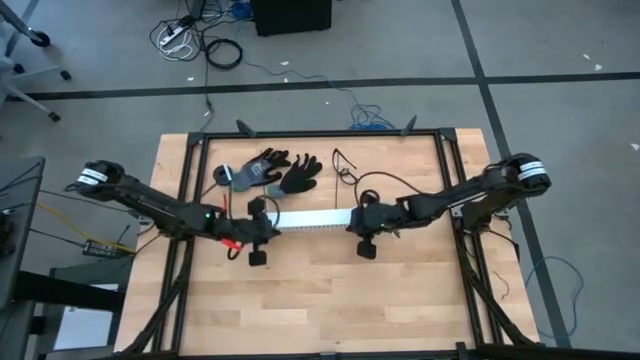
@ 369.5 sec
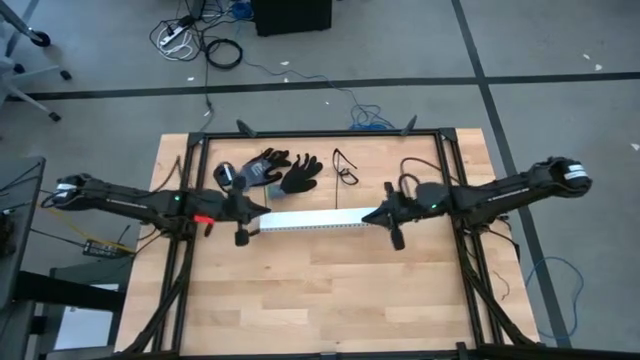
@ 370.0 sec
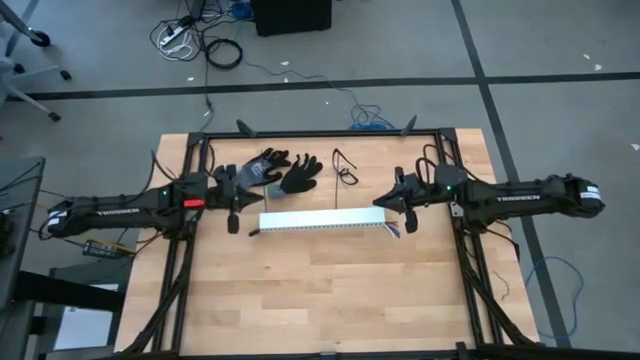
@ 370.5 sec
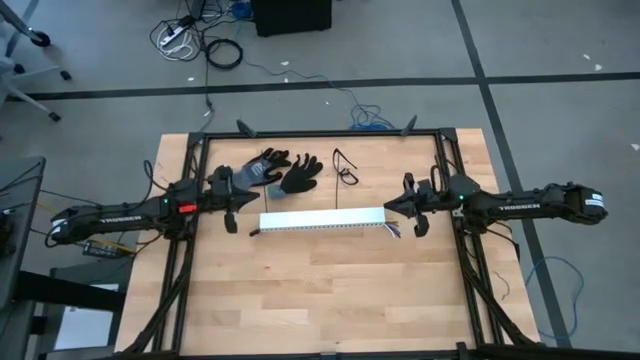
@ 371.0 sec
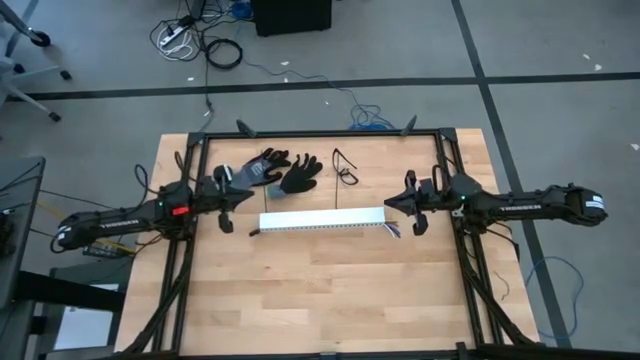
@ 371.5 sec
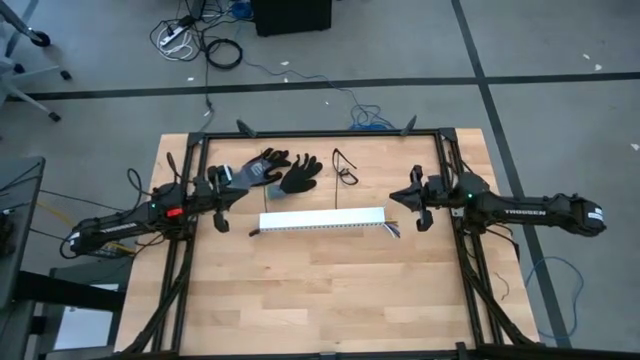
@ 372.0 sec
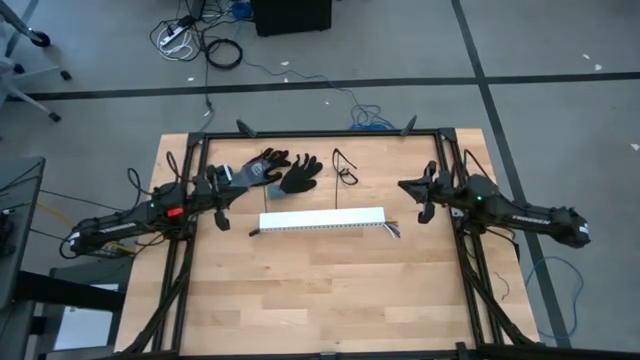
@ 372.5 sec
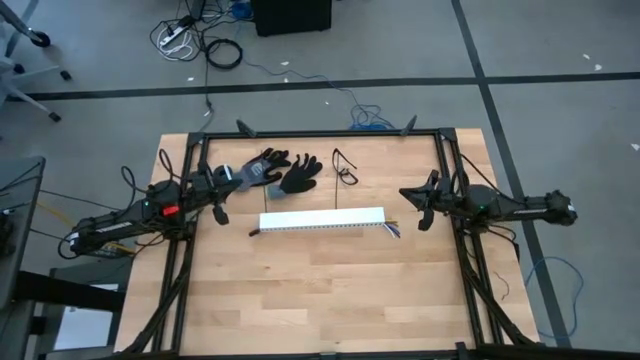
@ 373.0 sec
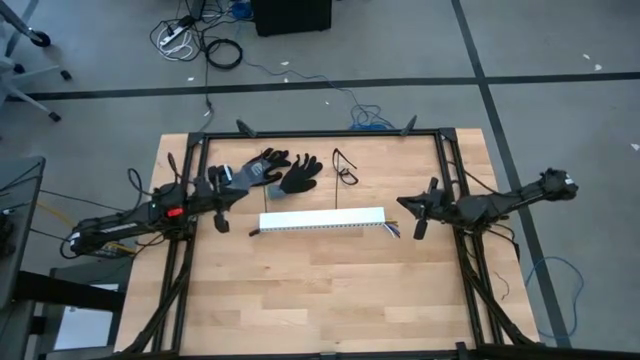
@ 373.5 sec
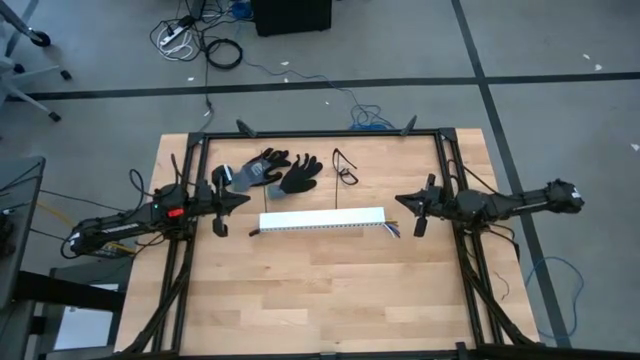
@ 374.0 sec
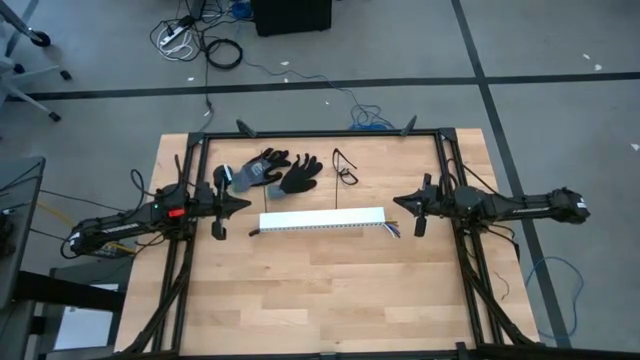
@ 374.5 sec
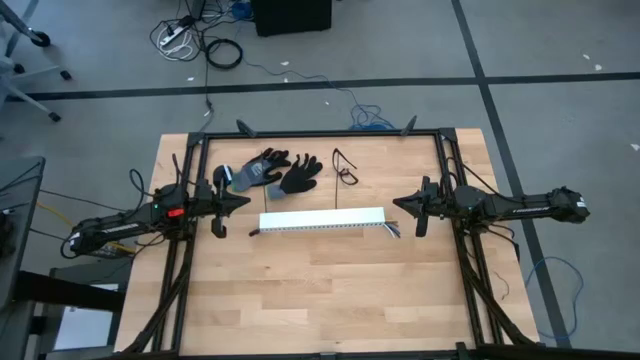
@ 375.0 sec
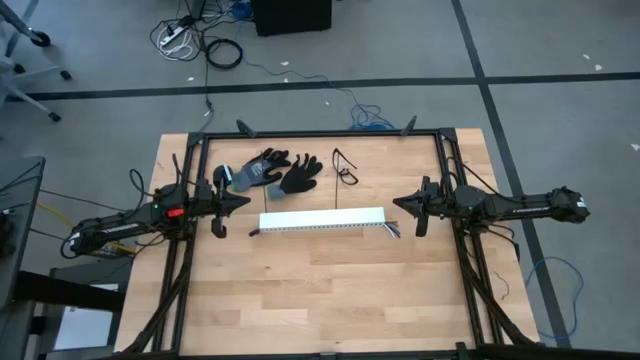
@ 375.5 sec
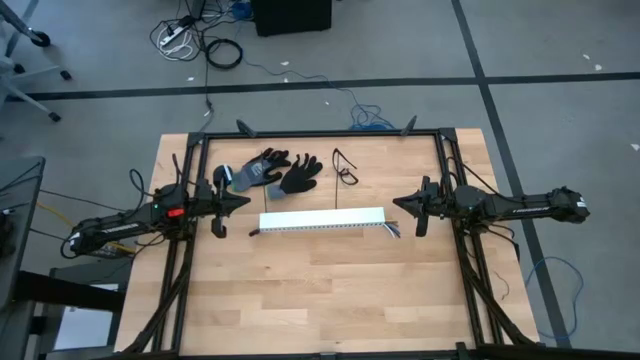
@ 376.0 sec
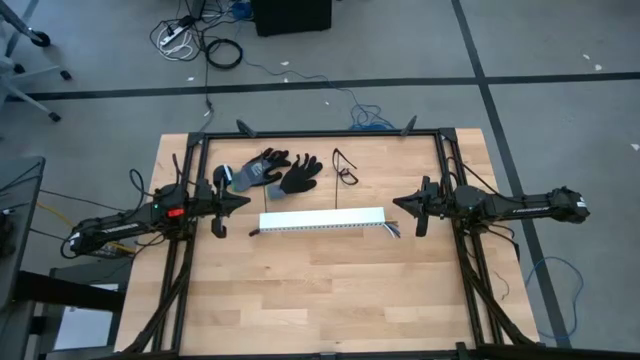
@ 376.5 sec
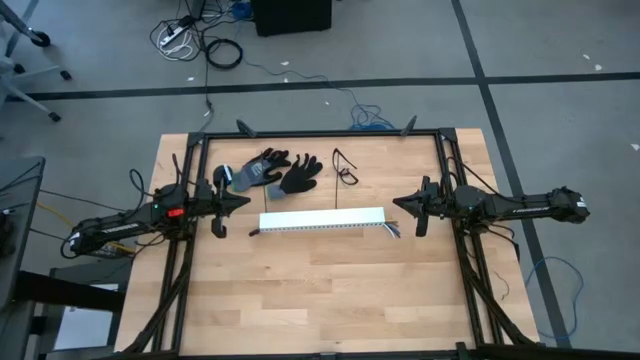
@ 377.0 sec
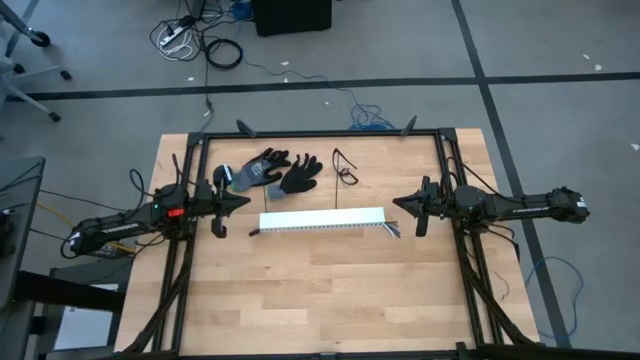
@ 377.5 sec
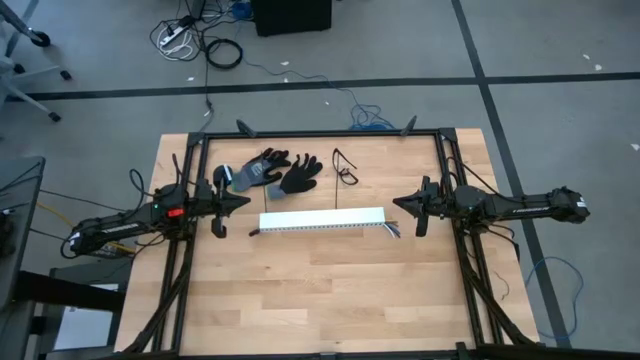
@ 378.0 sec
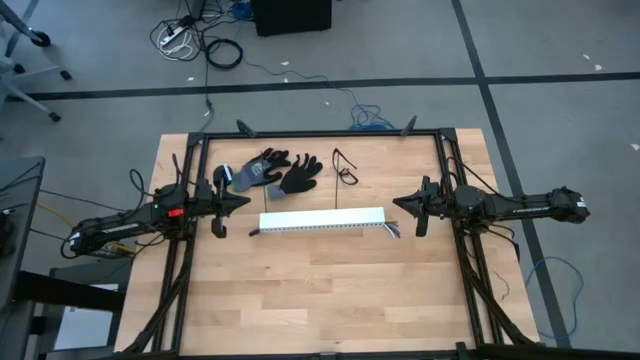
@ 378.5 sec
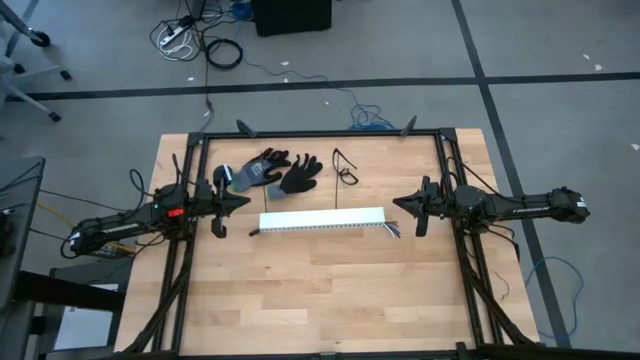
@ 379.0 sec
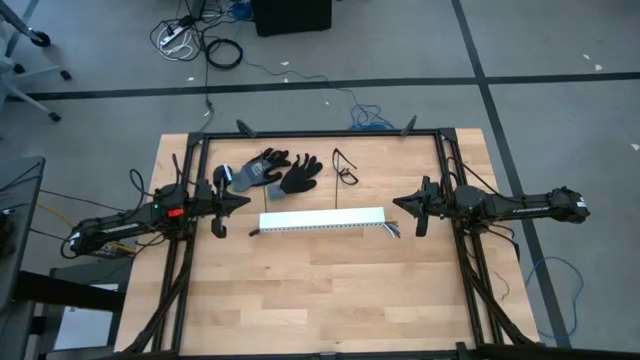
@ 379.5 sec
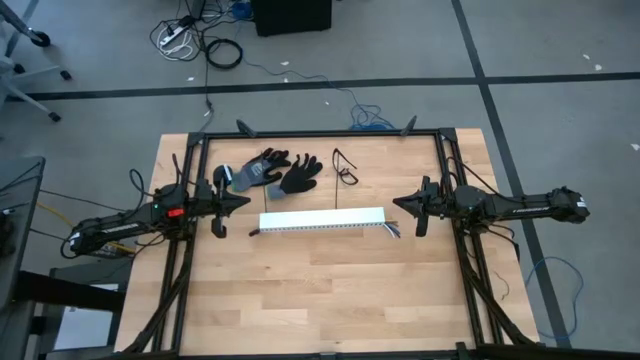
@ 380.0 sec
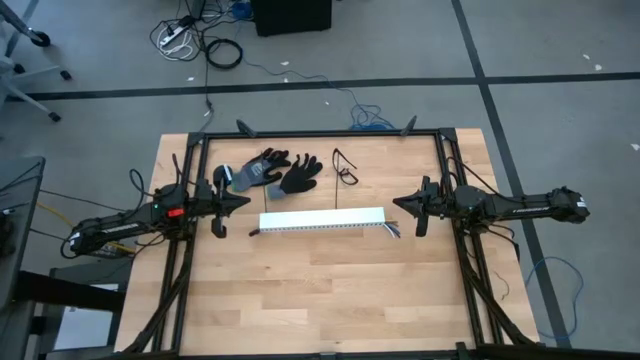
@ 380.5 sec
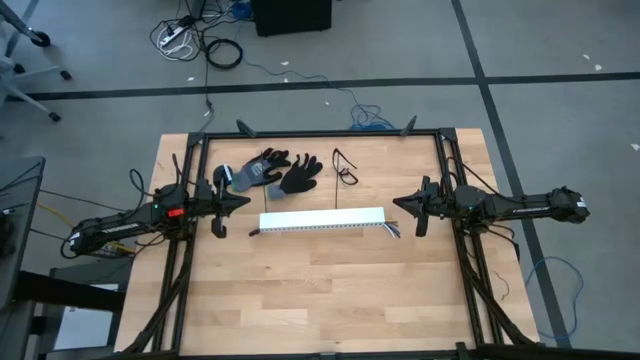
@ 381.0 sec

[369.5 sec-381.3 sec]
Task: Ziptie cables
Return to Home Position

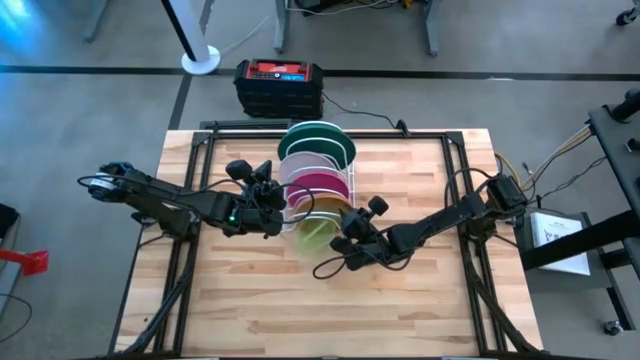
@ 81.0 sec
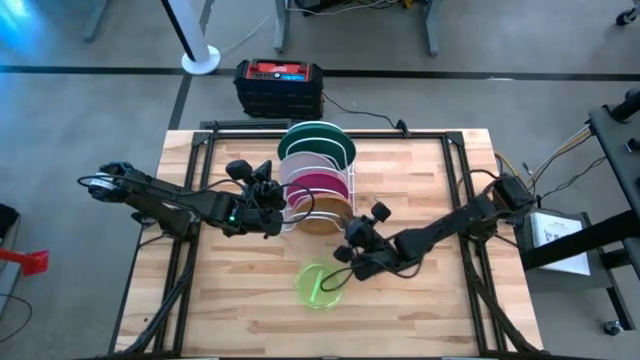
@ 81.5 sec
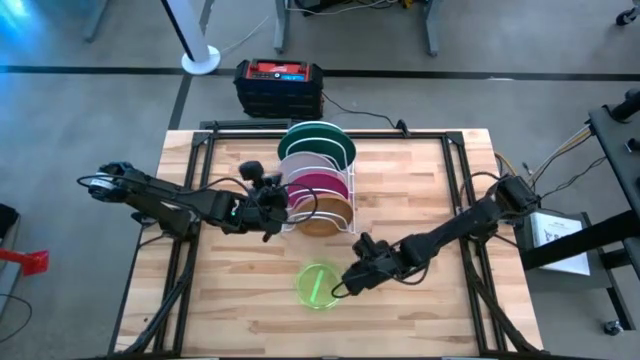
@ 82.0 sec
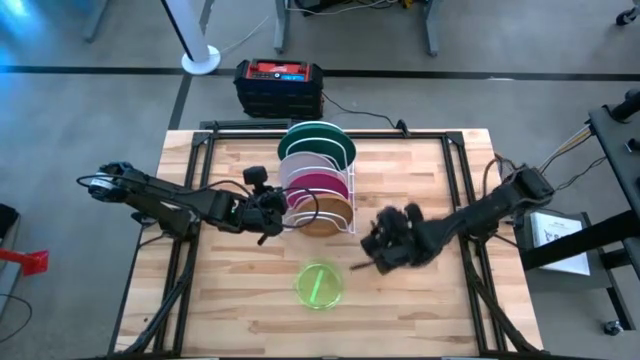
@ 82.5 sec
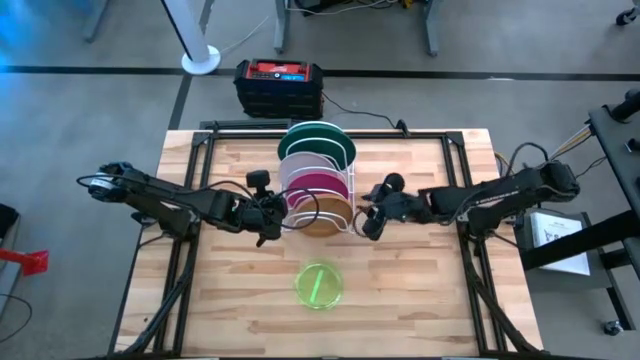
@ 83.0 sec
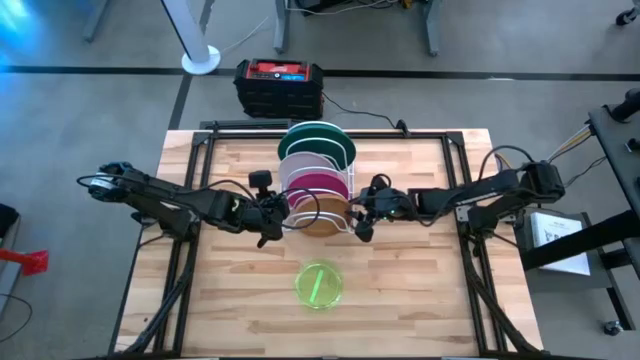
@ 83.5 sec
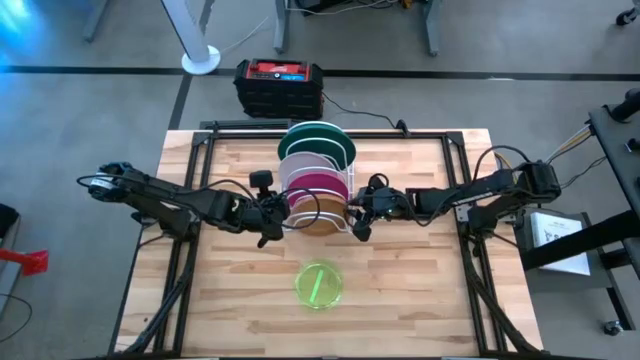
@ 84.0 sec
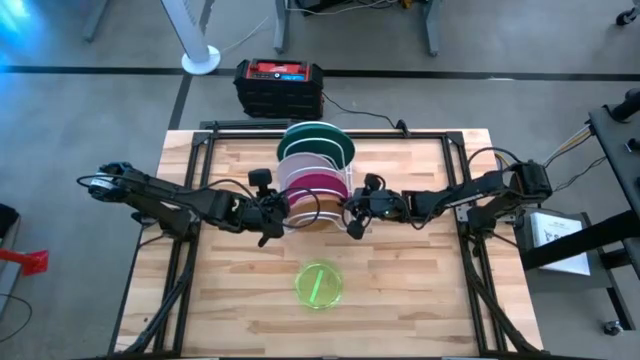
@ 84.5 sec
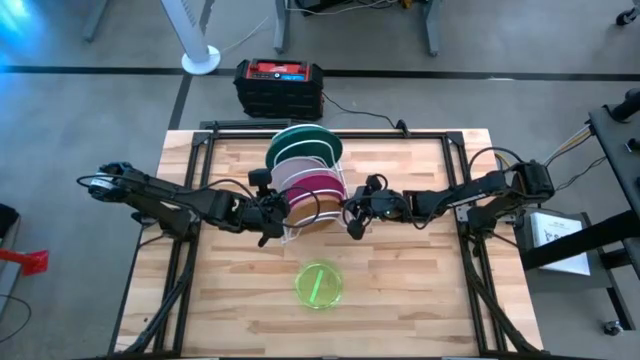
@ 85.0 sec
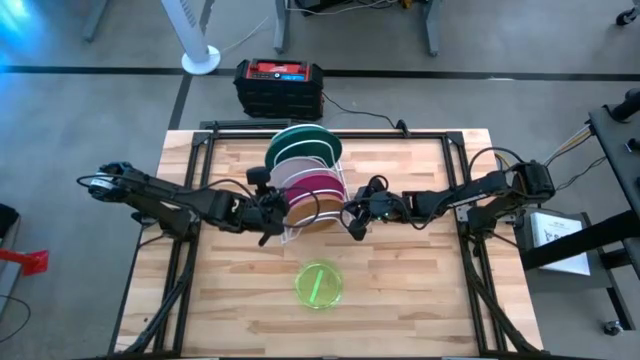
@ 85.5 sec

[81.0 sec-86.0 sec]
Task: Sort dishes
Adjust the brown plate in the dish rack
